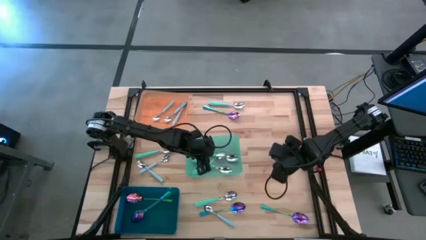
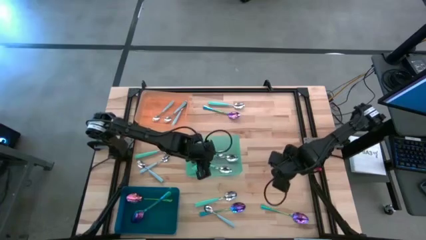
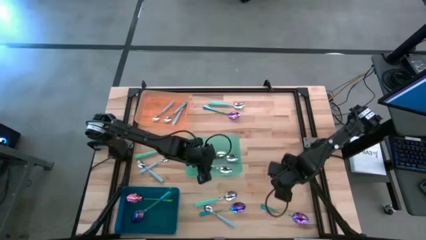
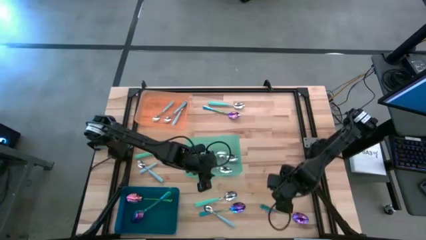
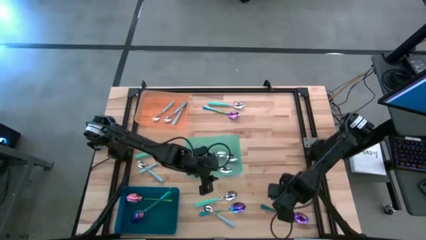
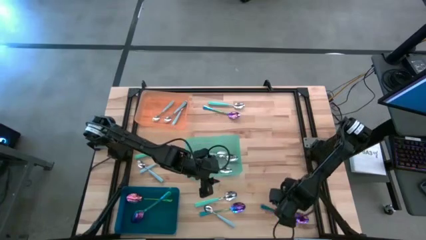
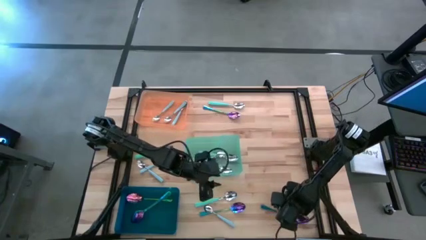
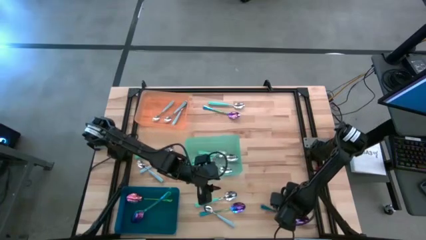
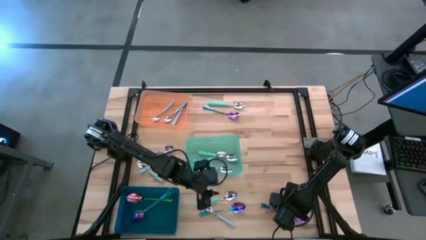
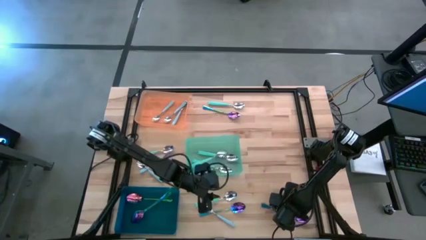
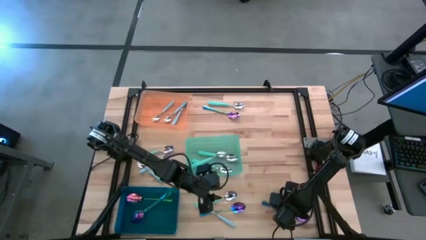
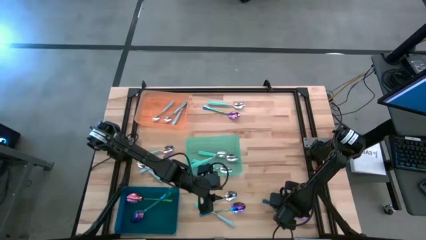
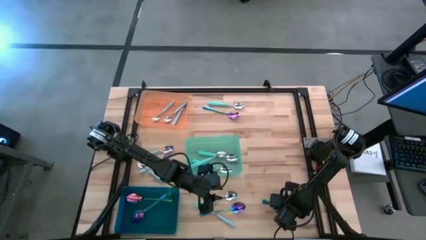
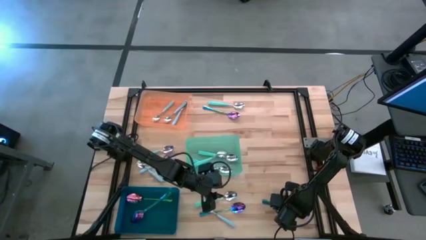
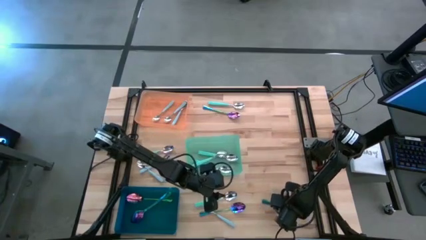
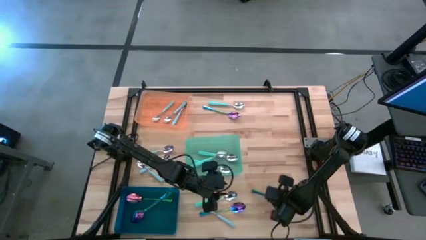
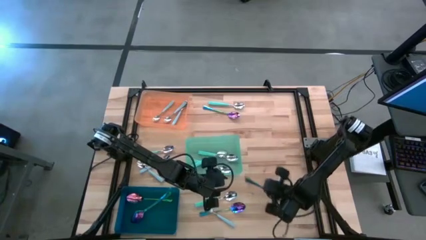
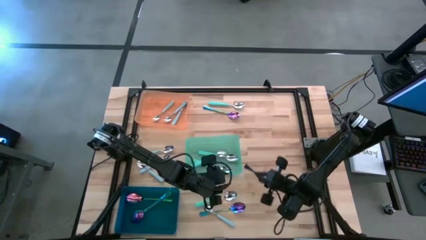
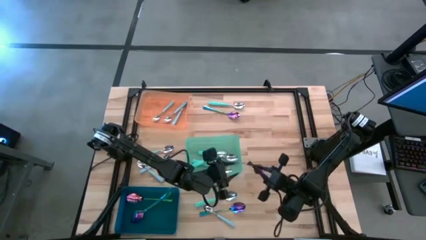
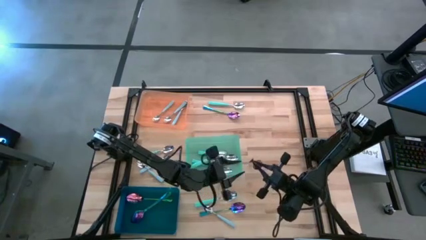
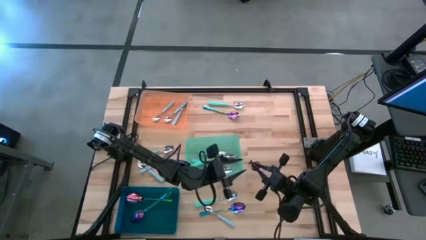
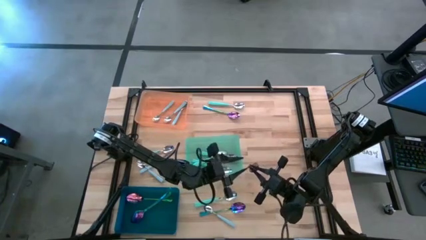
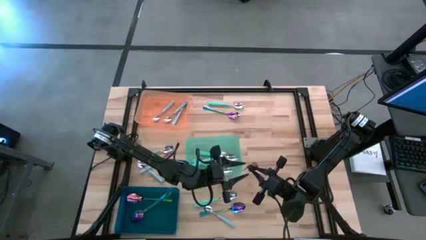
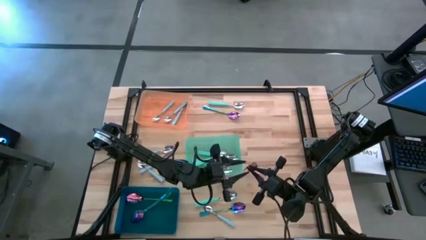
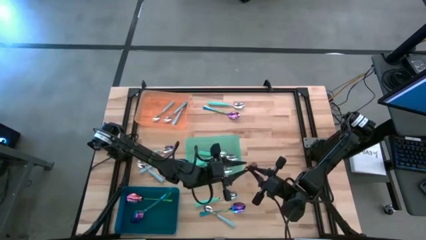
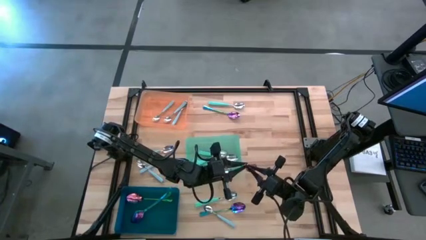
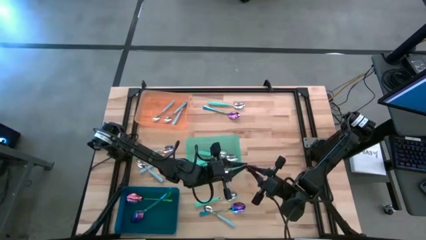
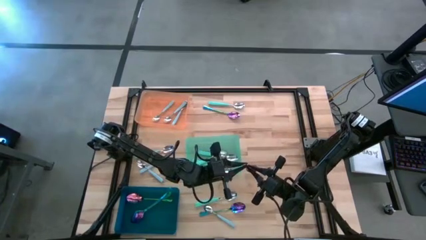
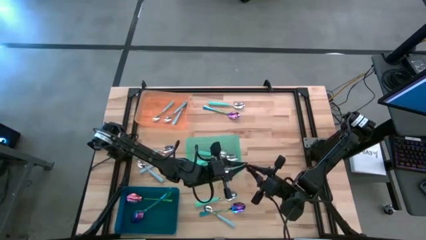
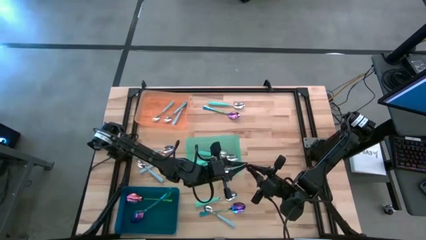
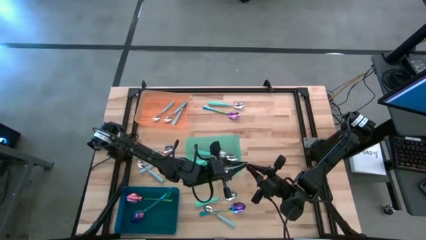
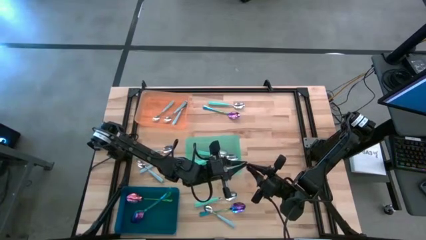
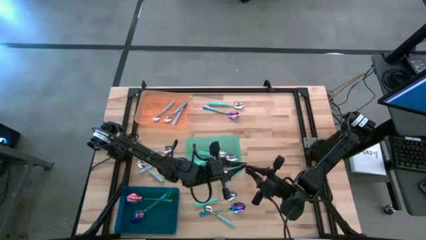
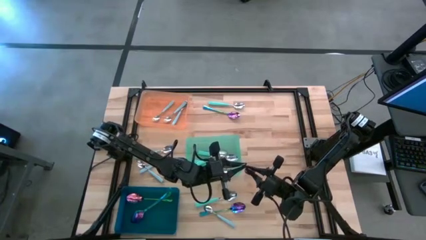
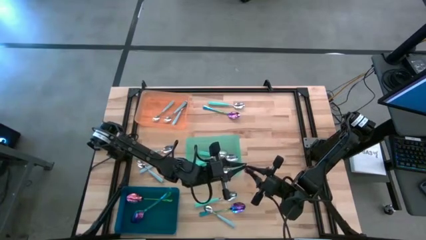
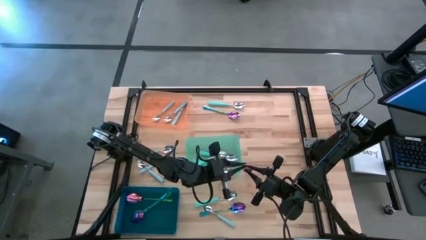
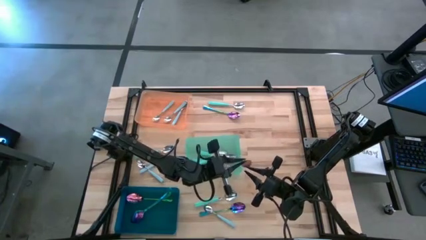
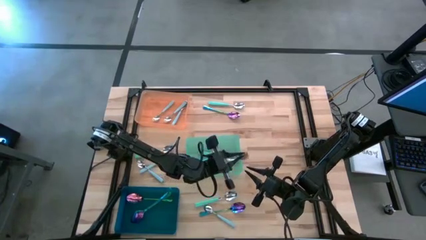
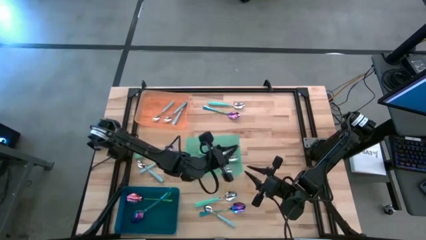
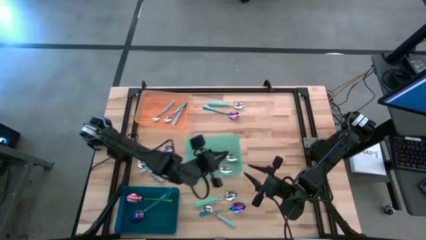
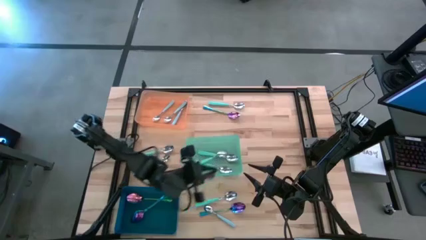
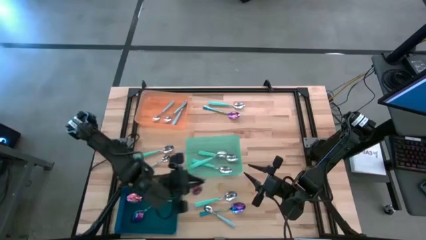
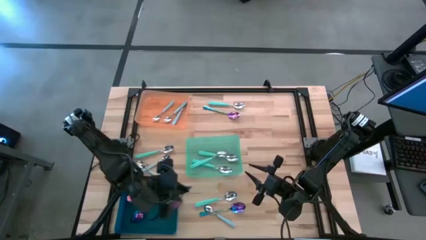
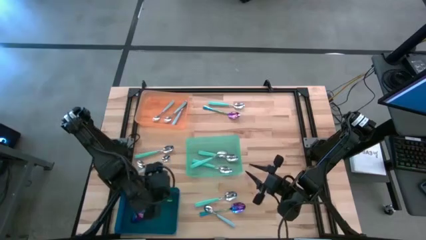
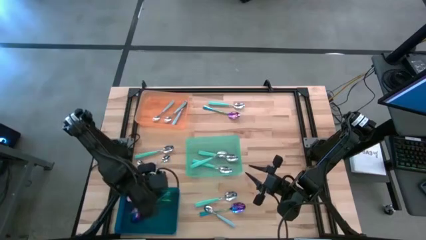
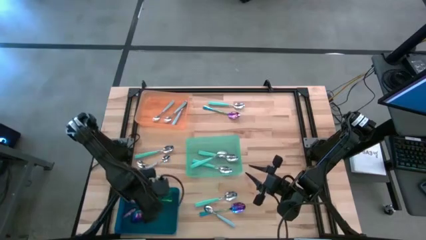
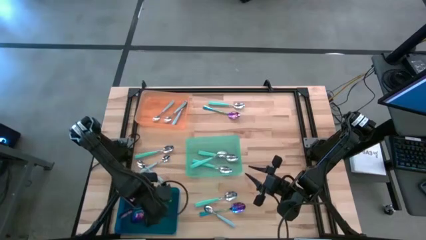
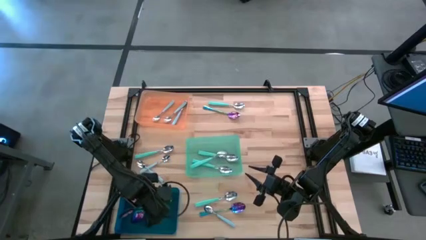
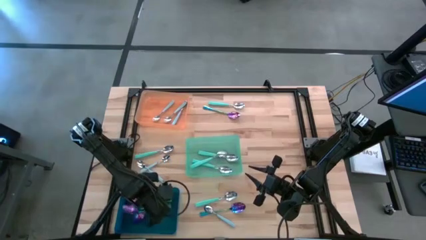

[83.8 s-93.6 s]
Task: Sort silverware by color (type)
Put the iridescent spoon into the blue bin

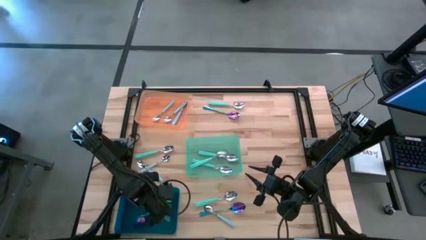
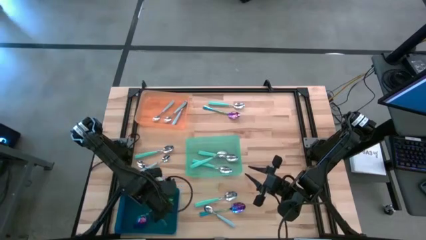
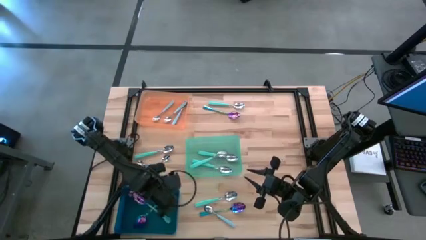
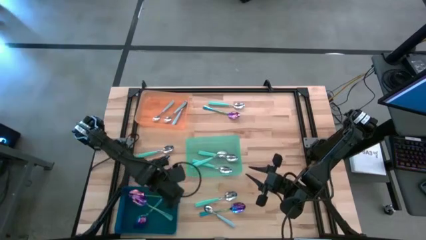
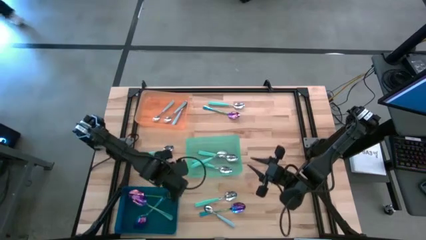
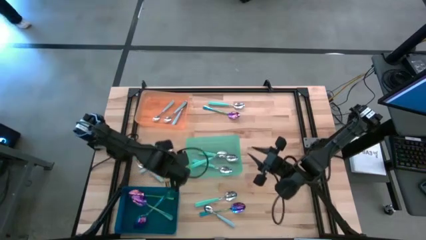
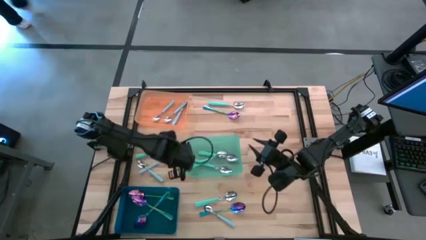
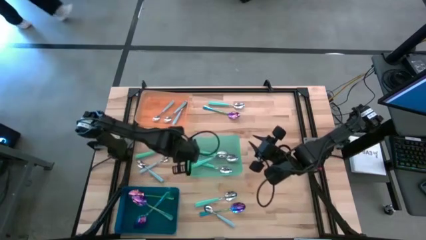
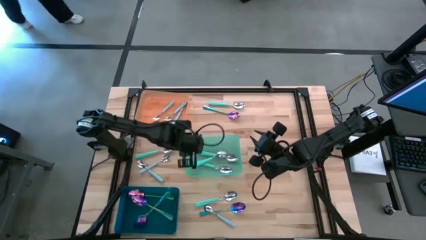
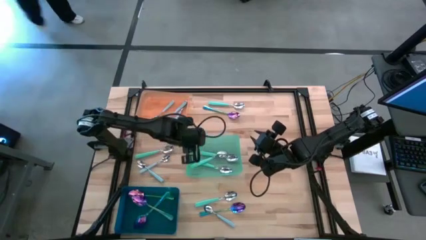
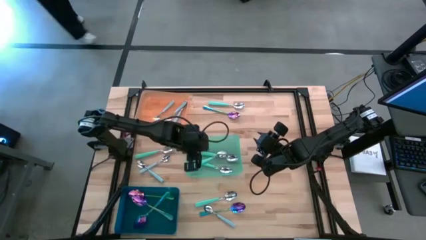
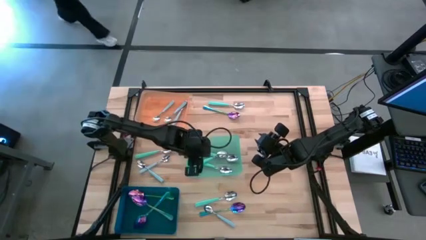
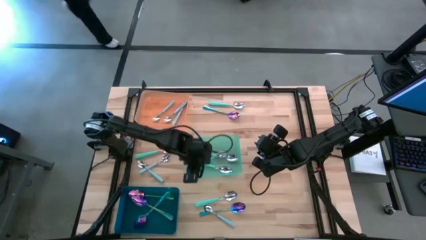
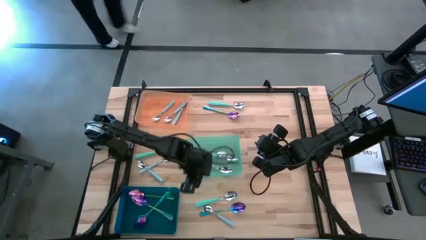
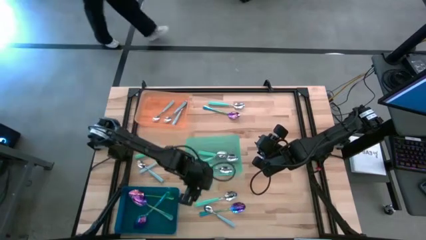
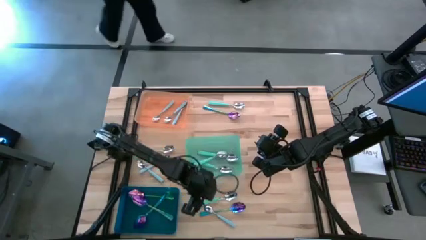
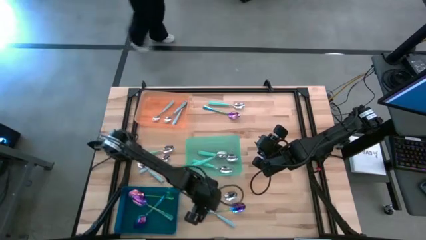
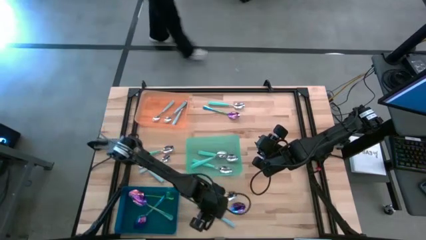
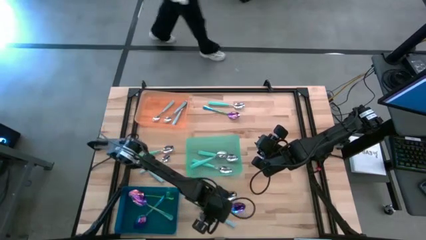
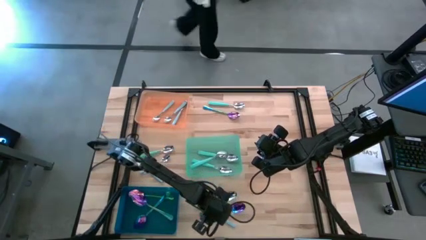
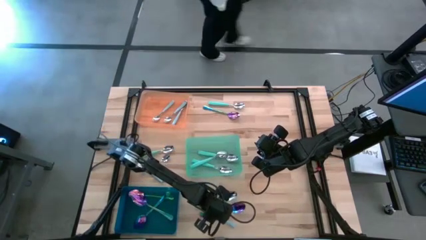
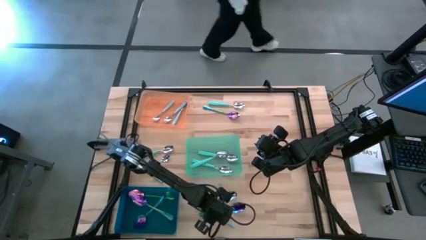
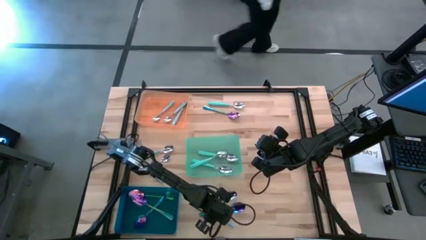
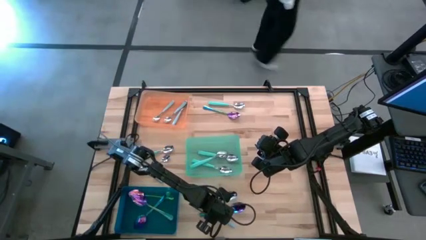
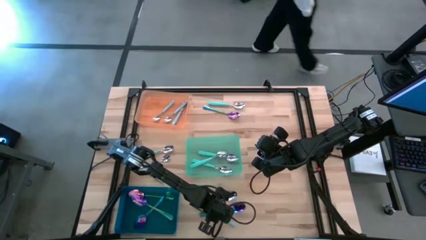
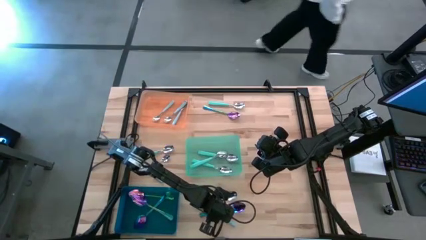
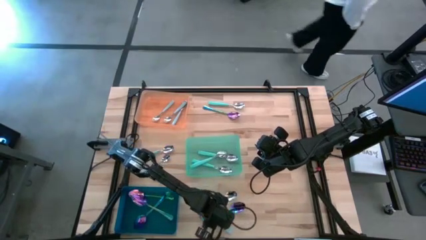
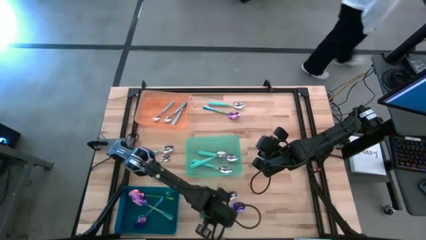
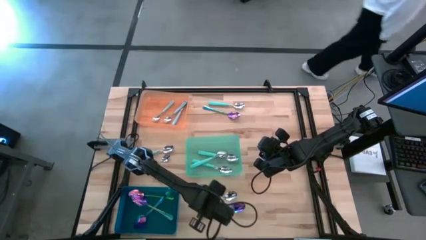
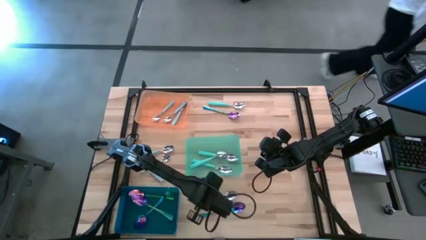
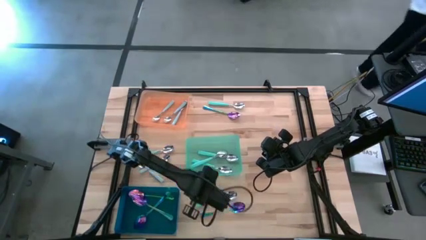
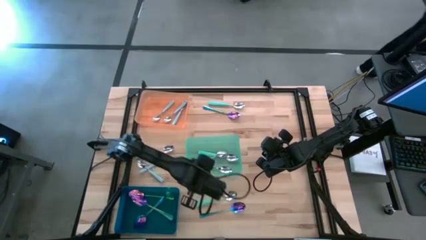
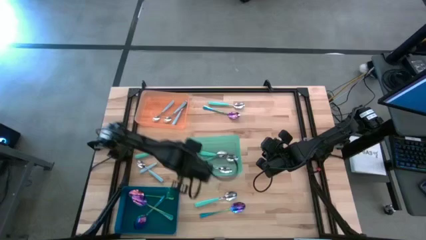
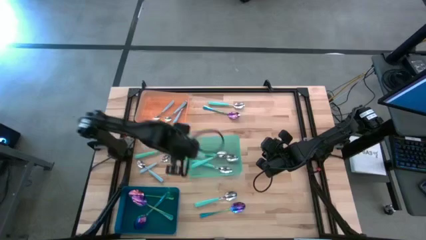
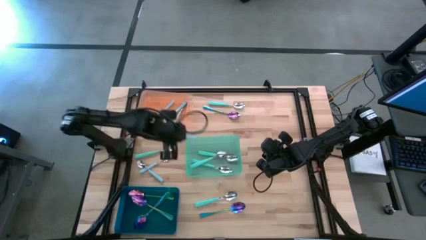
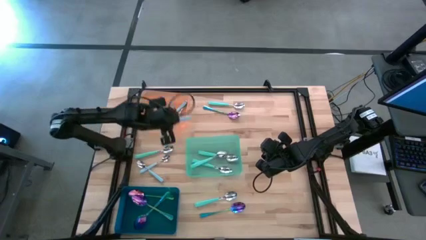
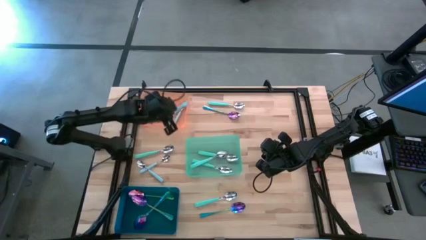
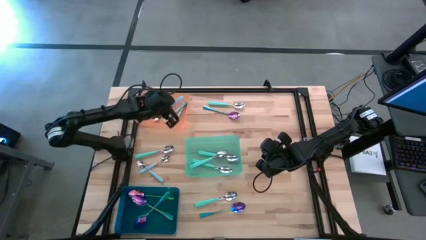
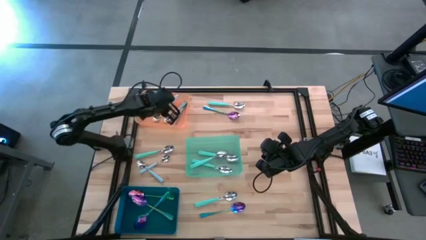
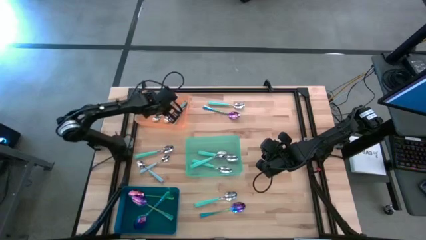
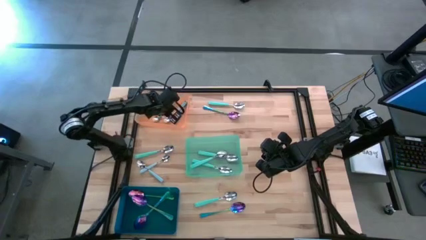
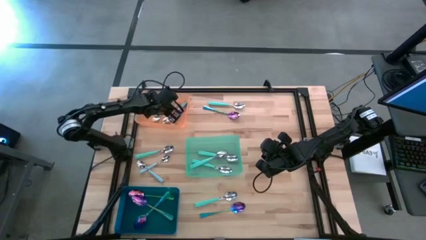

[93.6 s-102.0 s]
Put the blue spoon into the orange bin
